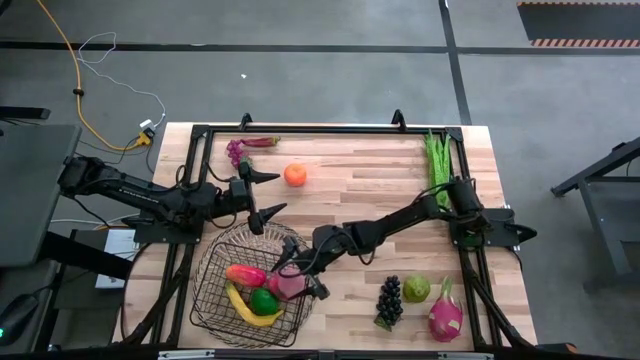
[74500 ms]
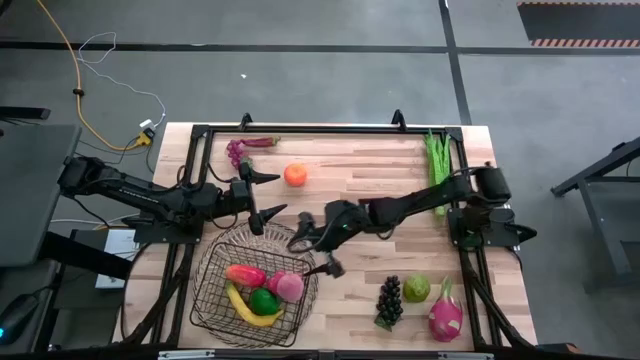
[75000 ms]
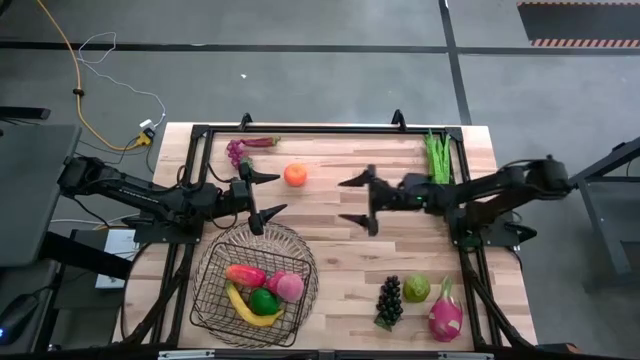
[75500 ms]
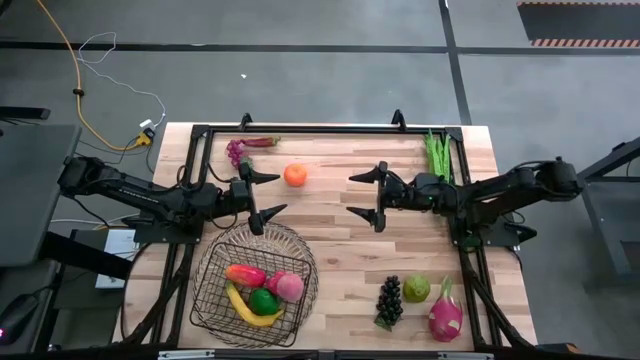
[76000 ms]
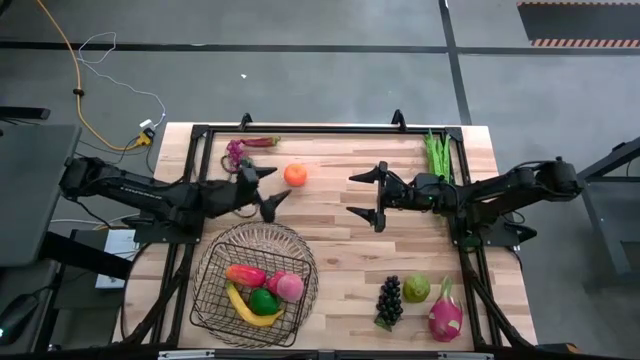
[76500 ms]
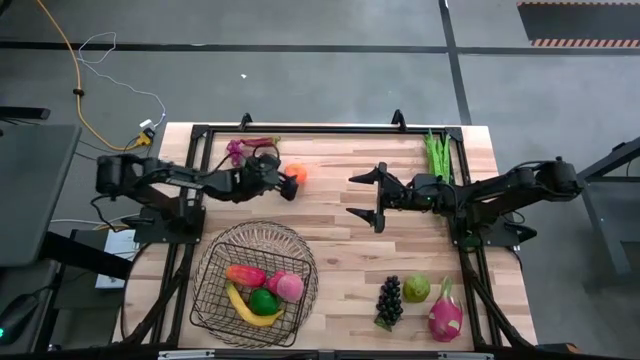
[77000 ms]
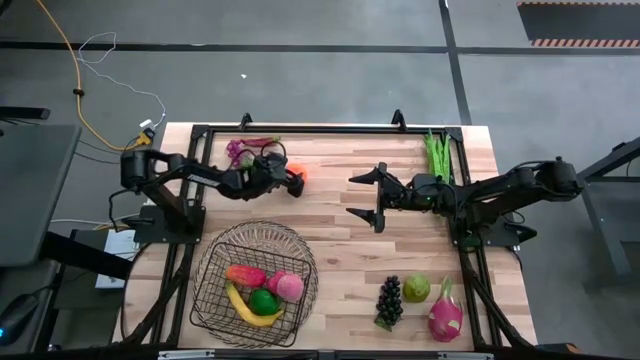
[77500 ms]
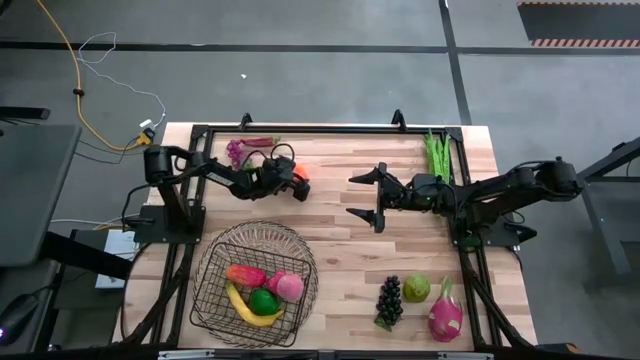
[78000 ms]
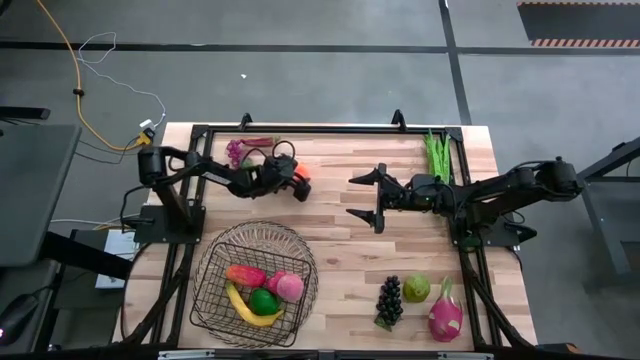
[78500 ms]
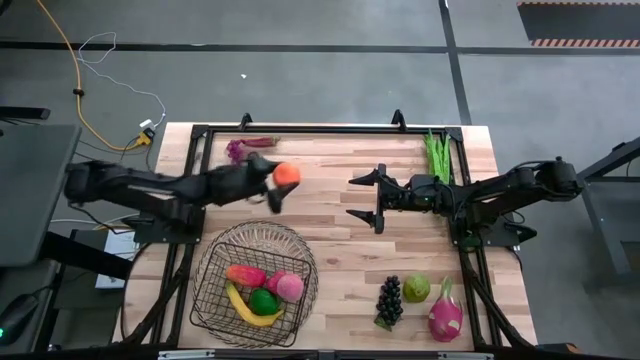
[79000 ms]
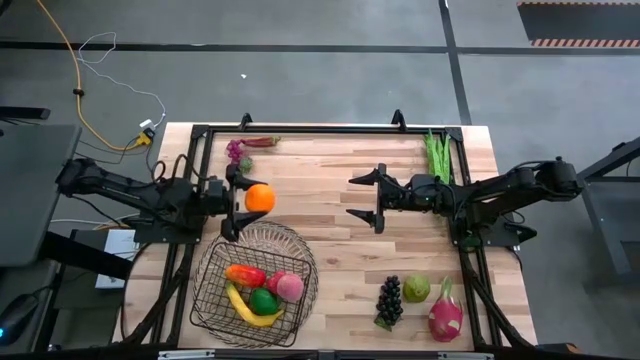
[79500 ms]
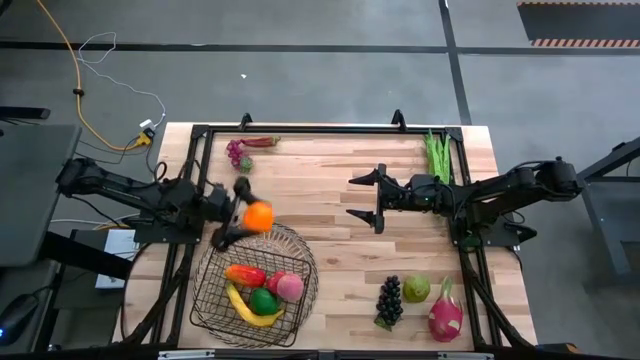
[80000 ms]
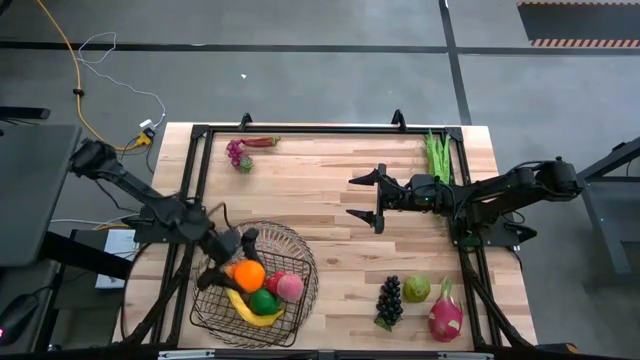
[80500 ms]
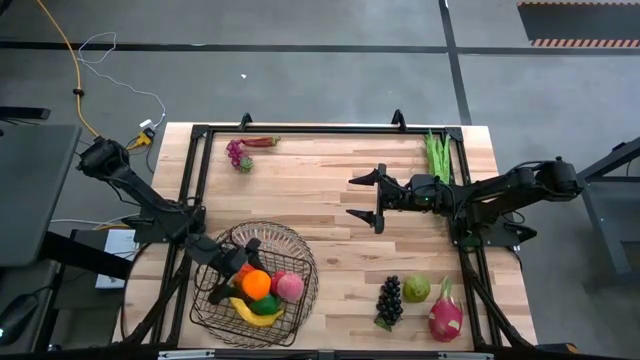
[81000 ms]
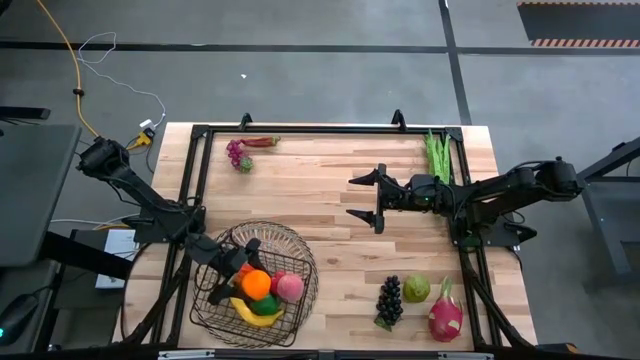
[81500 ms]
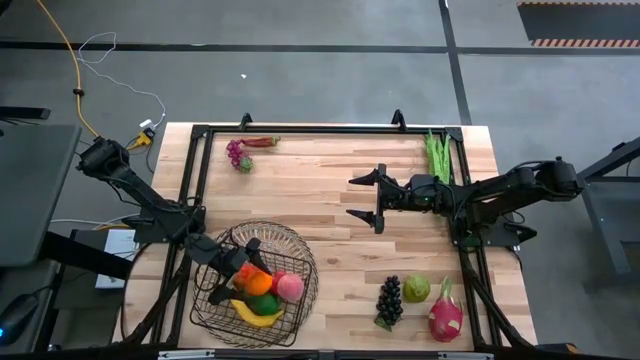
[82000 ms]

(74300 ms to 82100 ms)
Task: Build produce basket
Put the orange into the black wire basket

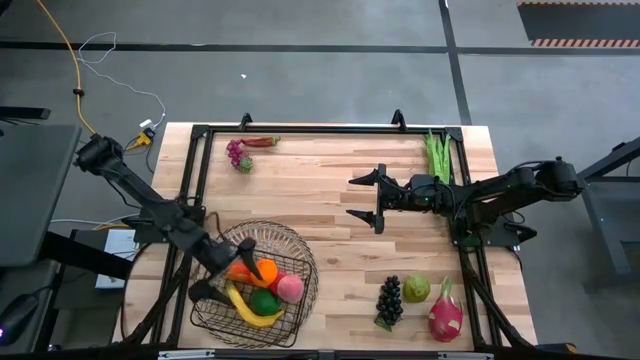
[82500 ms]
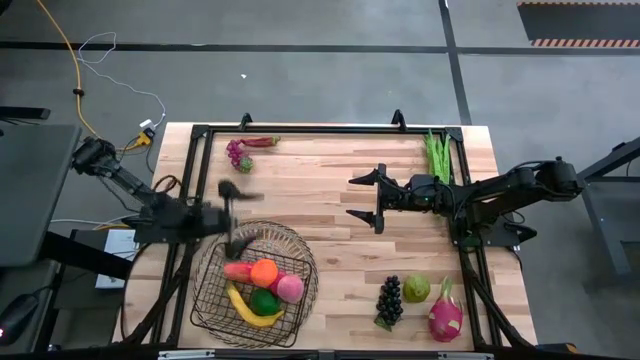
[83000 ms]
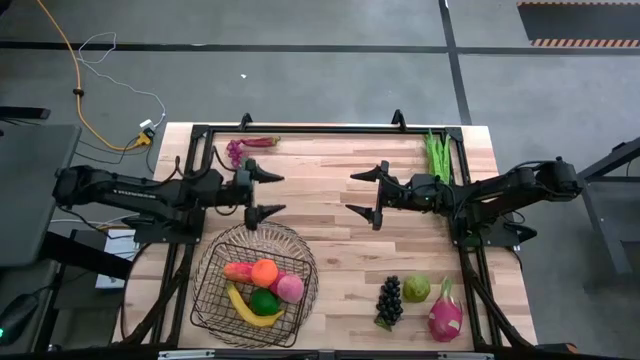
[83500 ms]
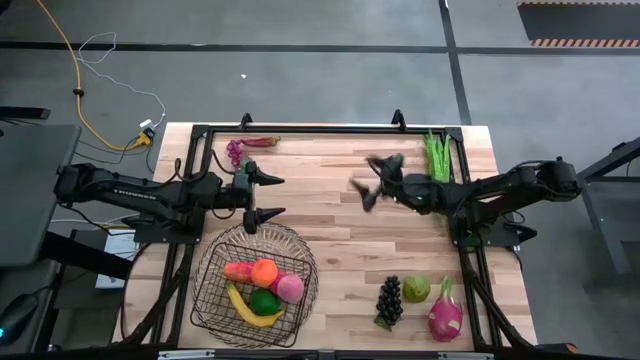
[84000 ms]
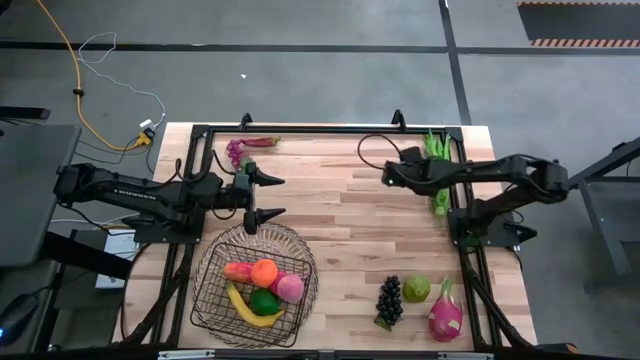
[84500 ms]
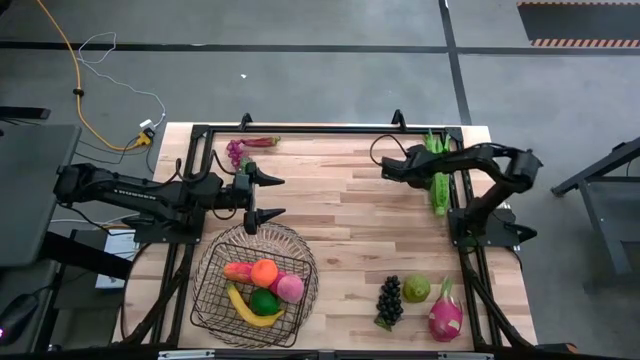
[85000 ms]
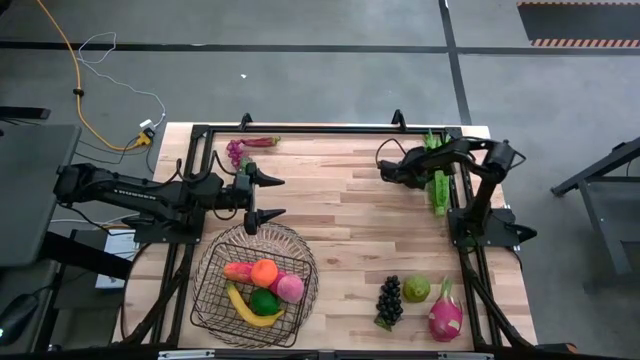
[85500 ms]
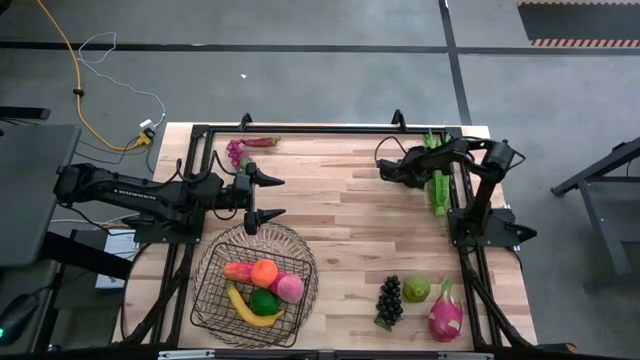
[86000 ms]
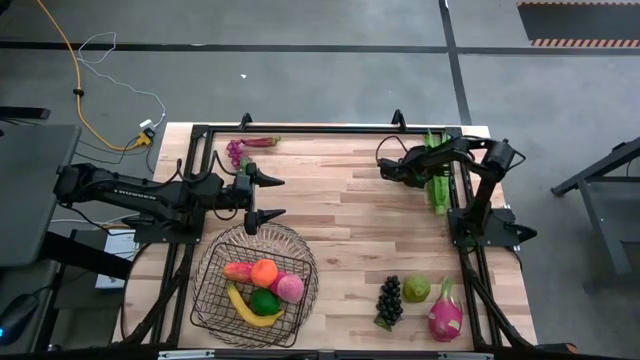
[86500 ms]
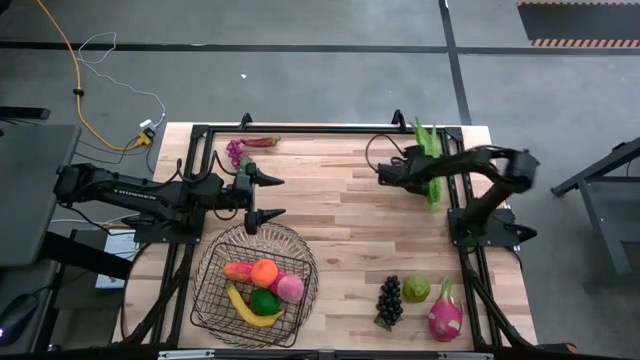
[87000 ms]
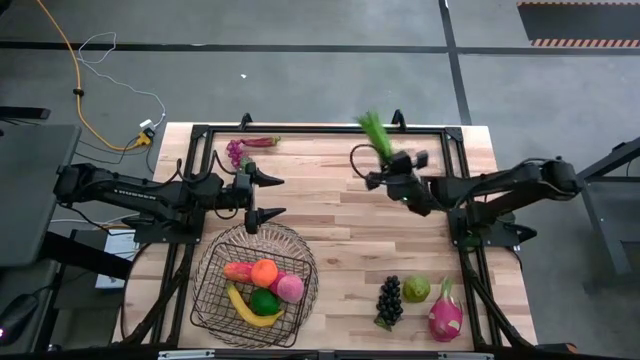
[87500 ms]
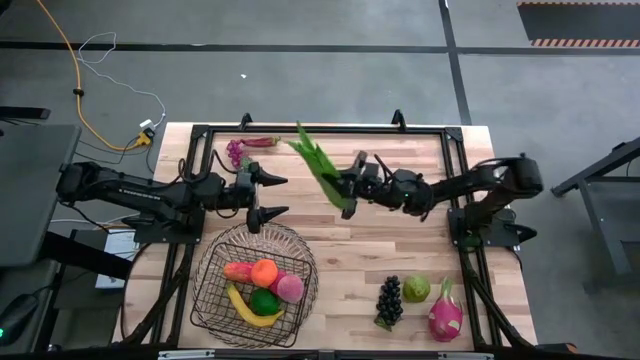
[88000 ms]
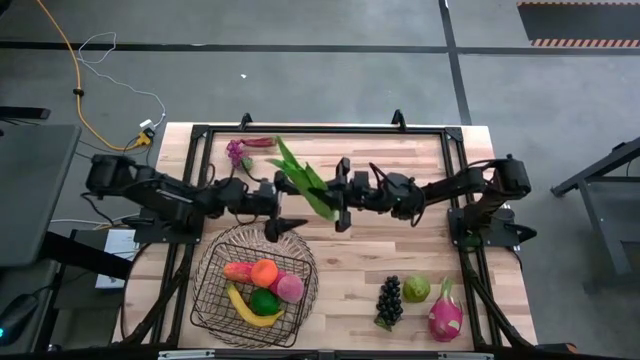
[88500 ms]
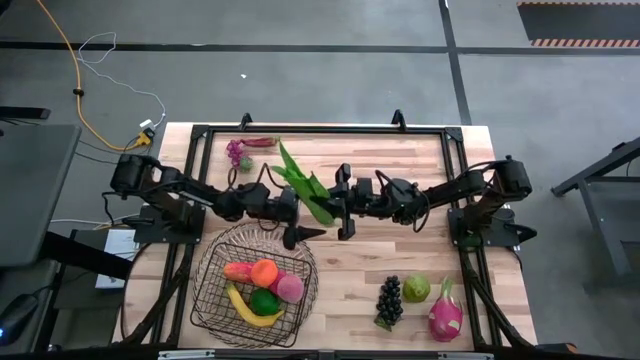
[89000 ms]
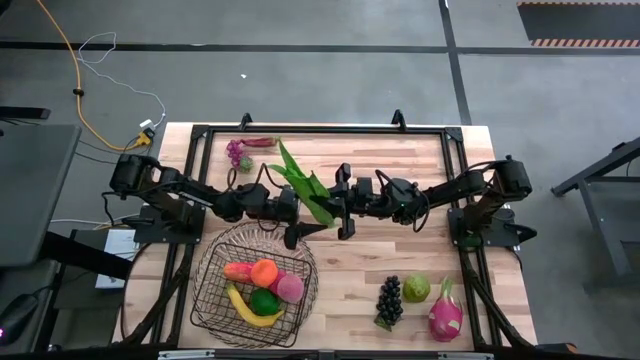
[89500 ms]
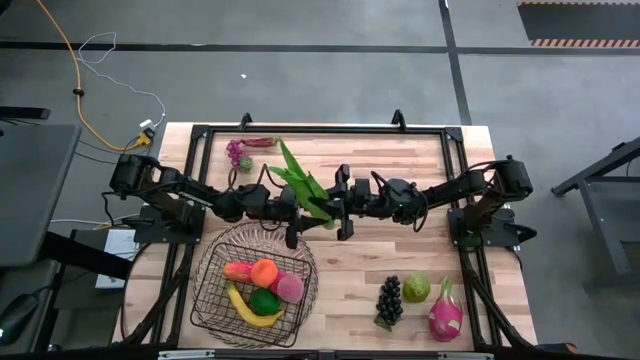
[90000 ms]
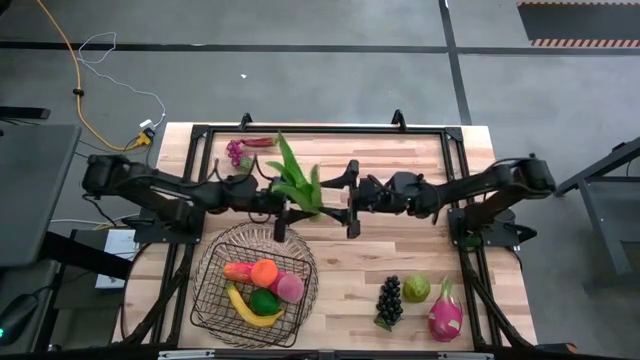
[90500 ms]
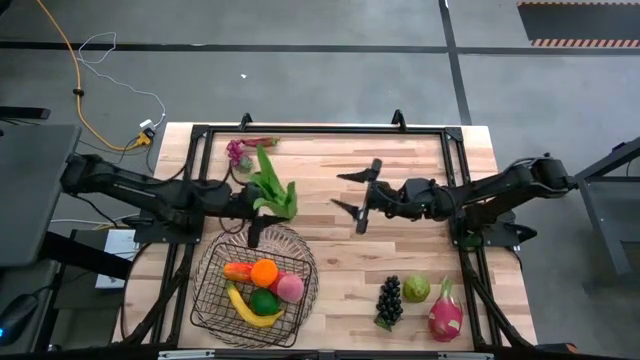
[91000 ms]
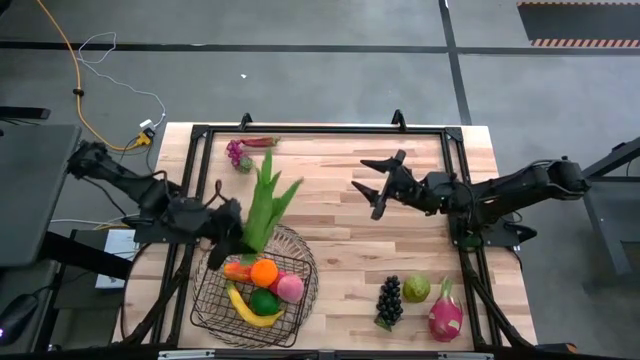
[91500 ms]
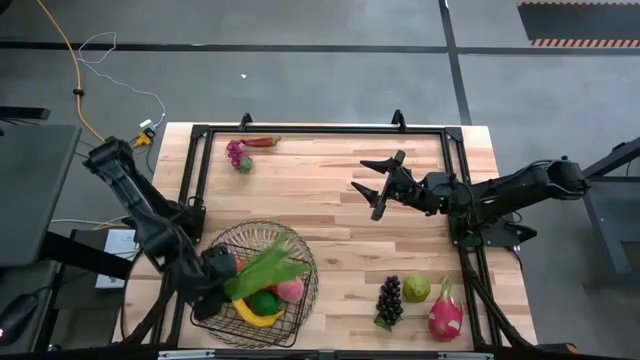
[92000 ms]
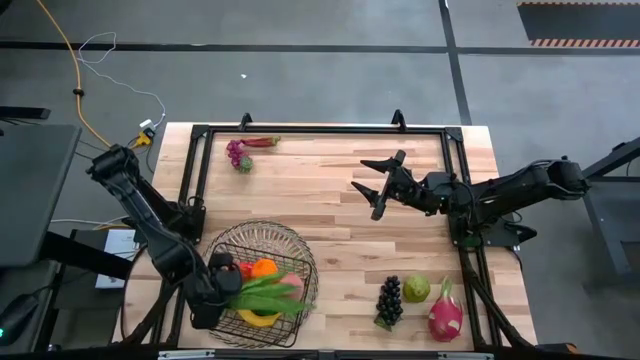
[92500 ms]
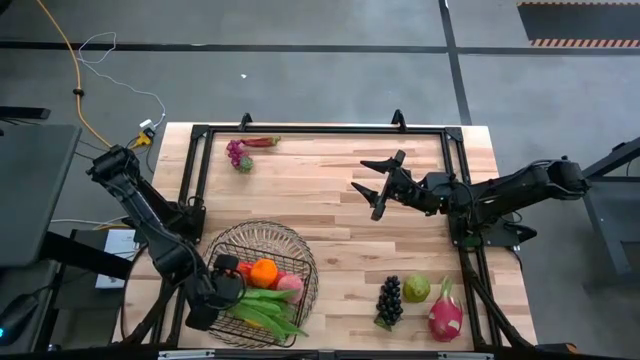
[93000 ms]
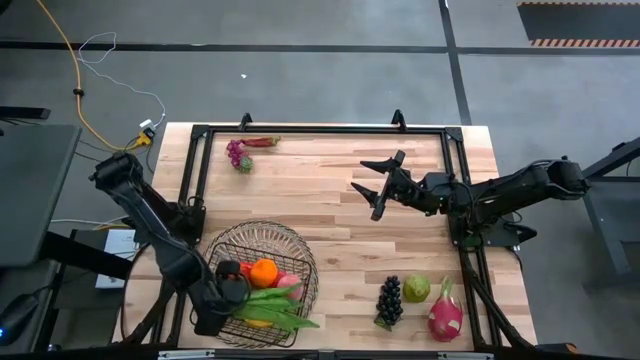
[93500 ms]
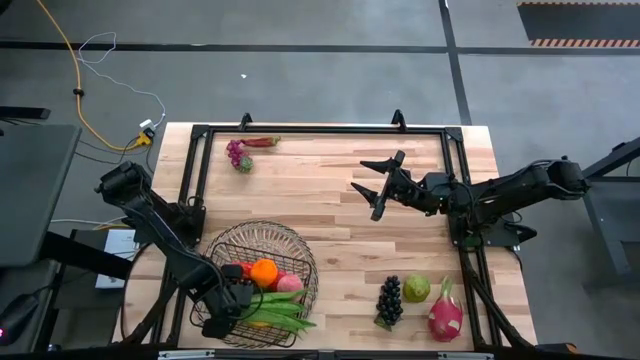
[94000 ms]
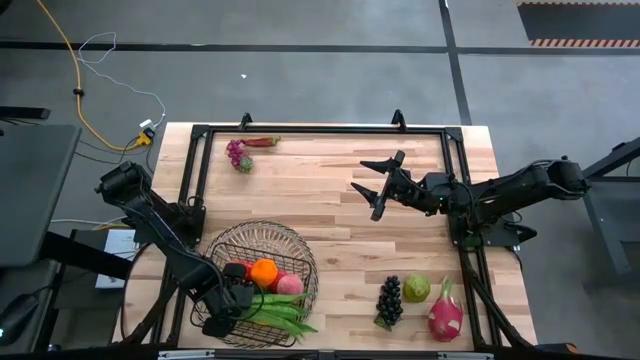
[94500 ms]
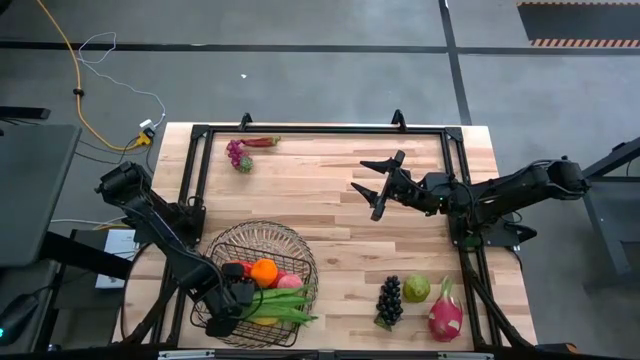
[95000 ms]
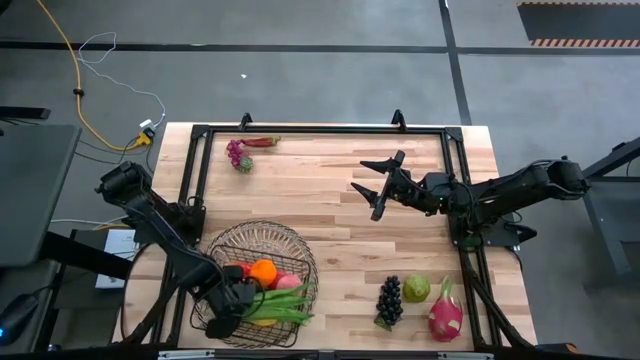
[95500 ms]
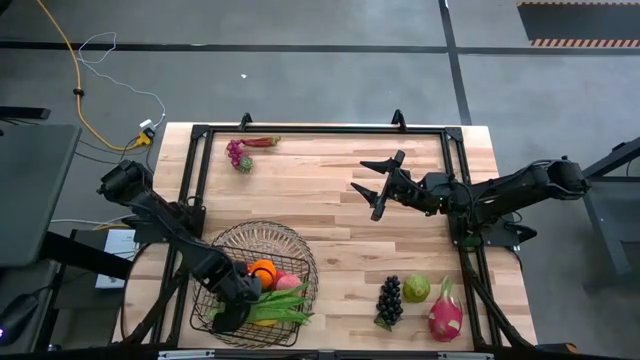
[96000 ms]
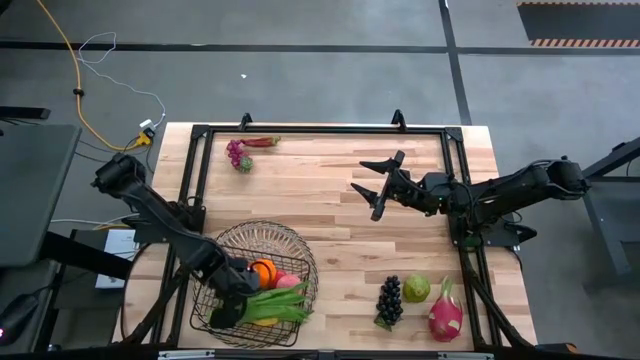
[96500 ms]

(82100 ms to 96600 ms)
Put the green leaf lettuce into the black wire basket
